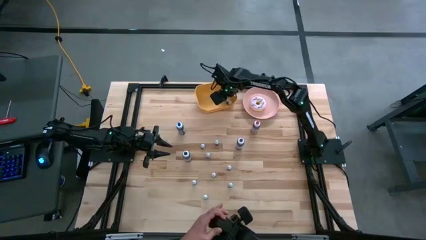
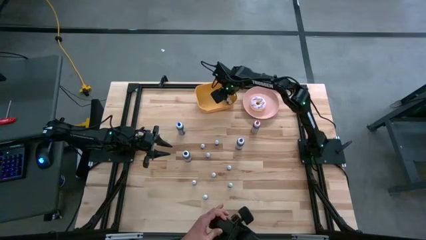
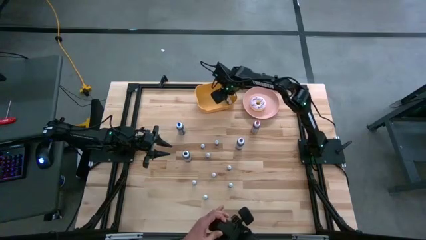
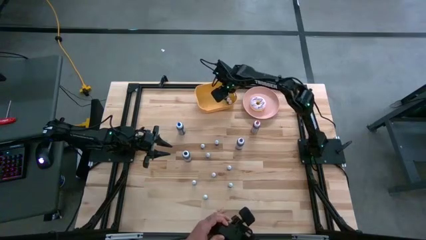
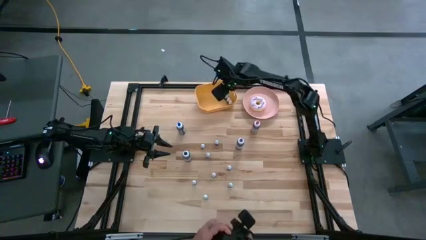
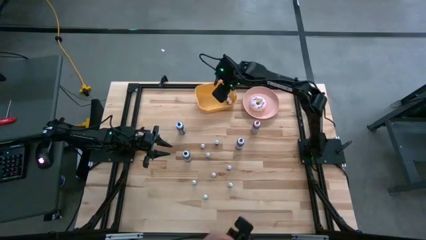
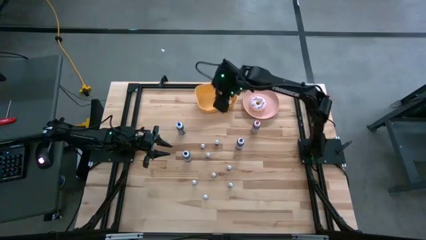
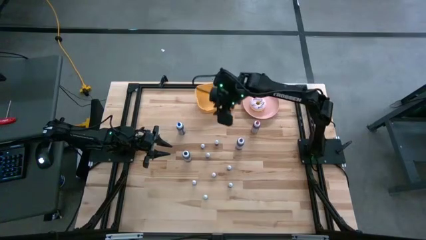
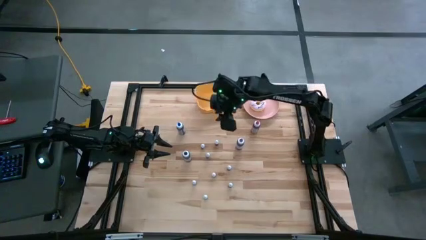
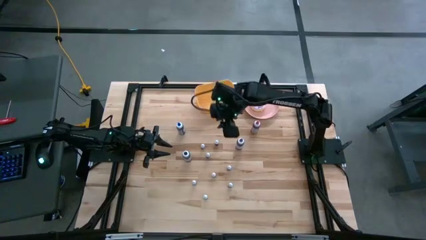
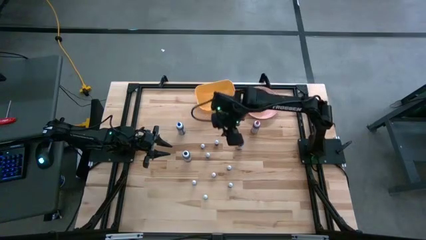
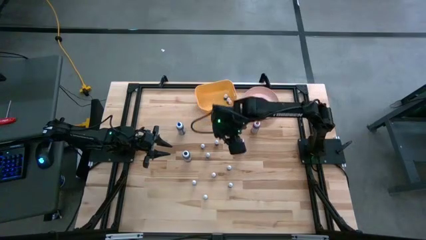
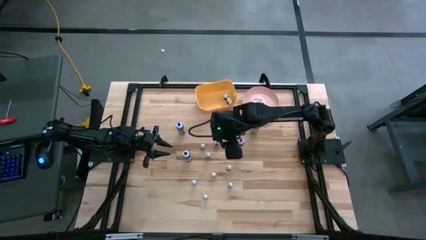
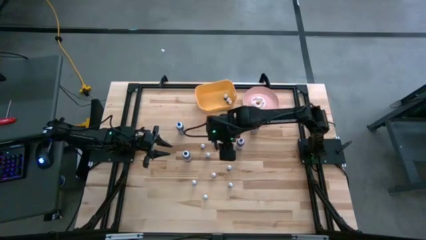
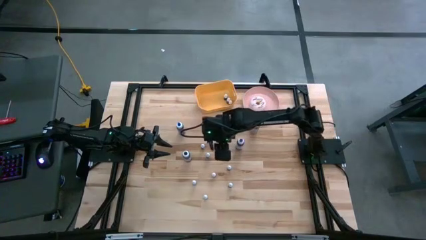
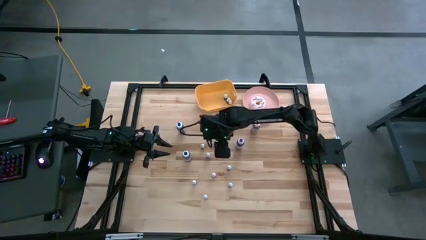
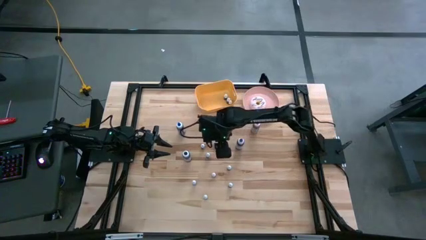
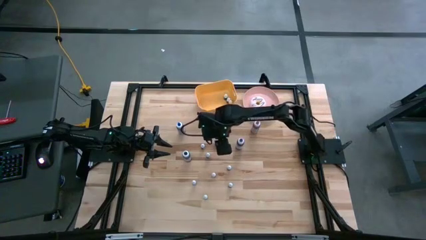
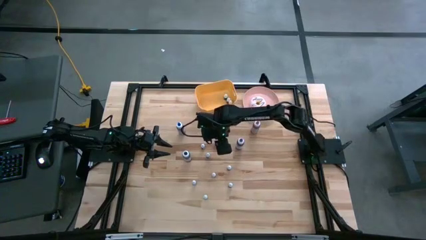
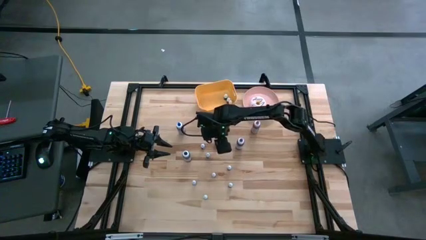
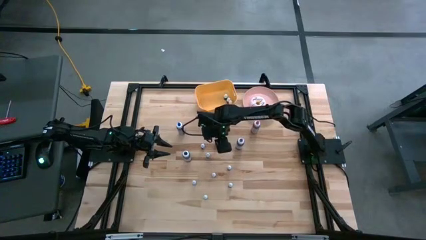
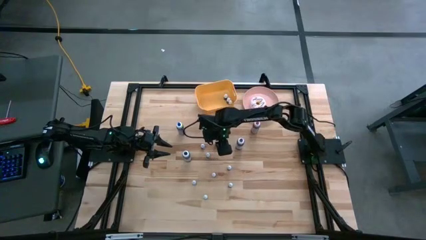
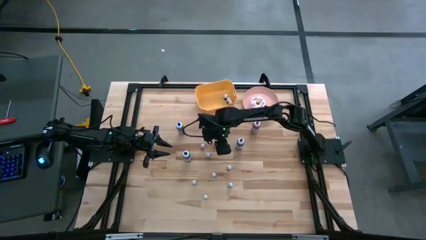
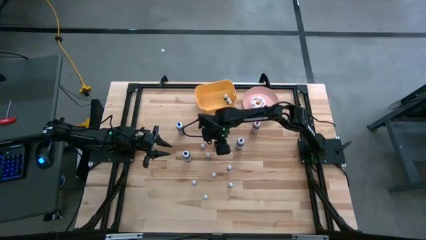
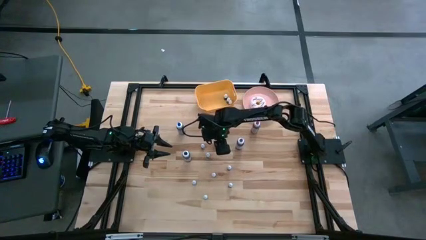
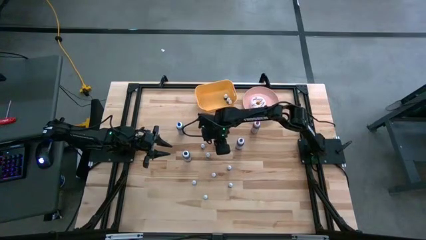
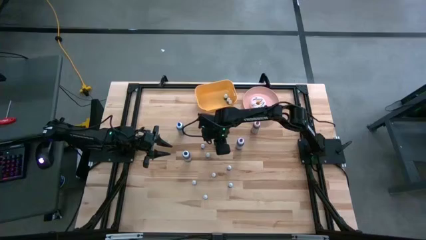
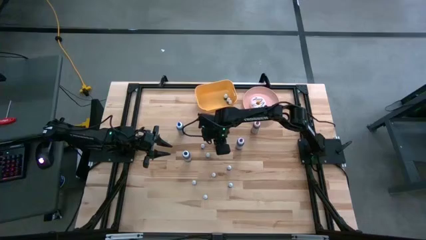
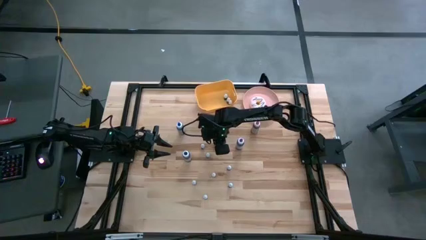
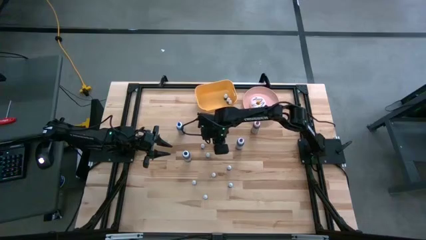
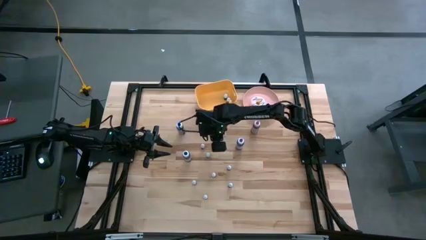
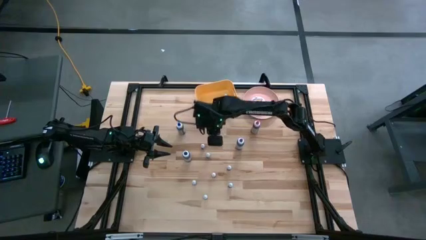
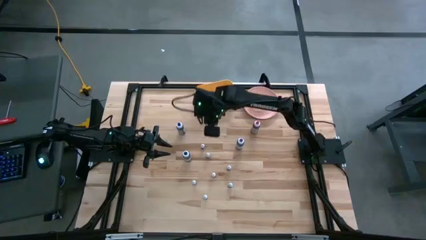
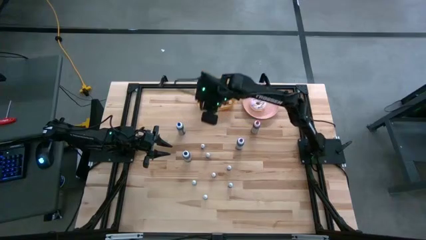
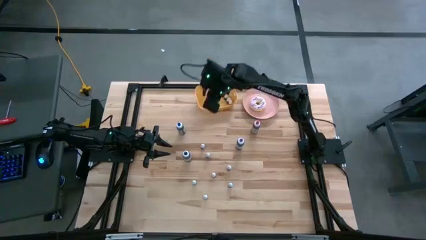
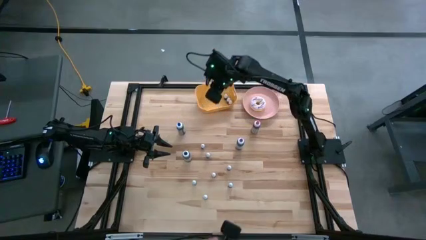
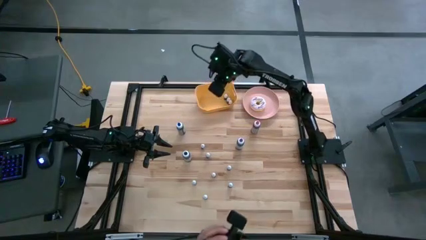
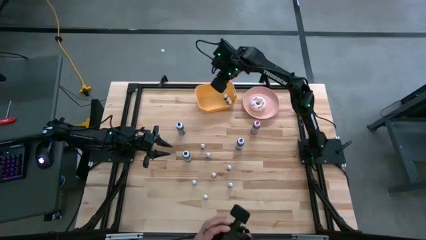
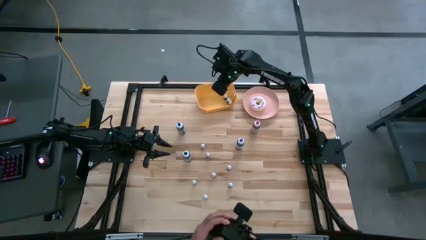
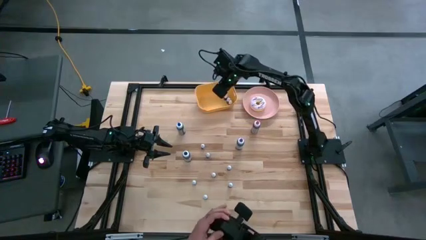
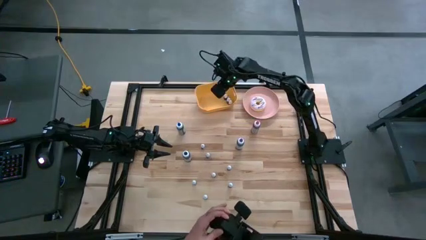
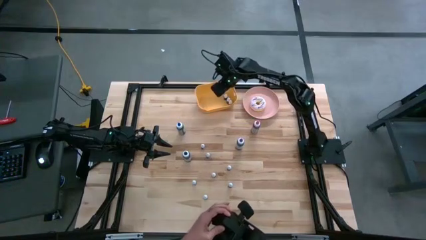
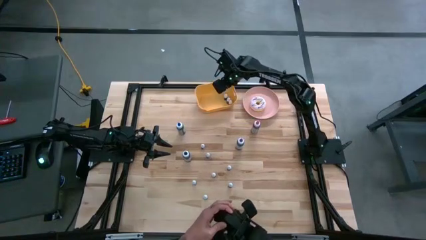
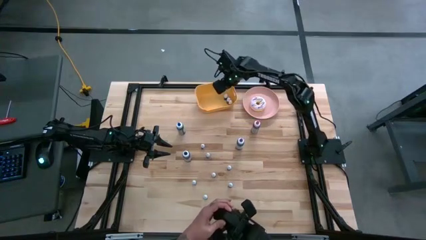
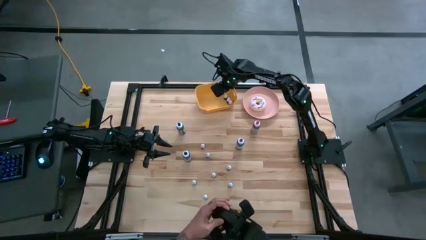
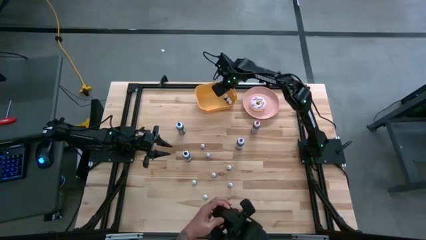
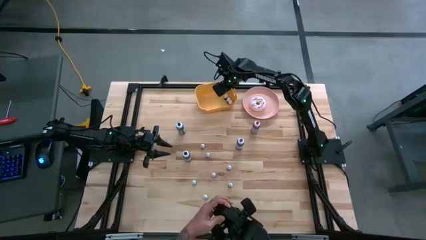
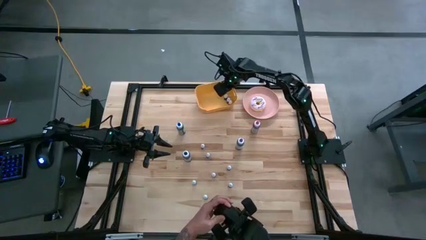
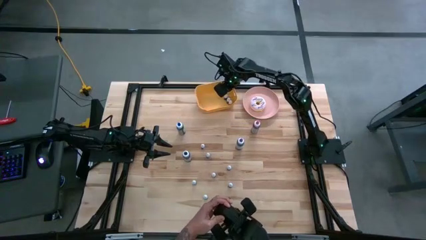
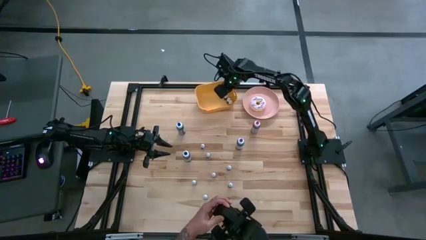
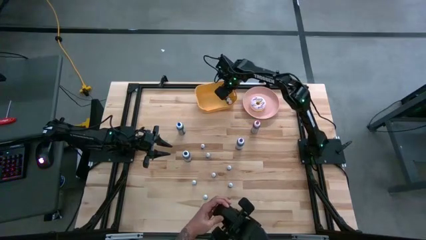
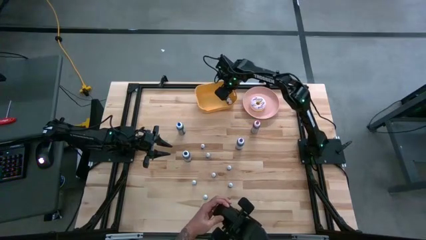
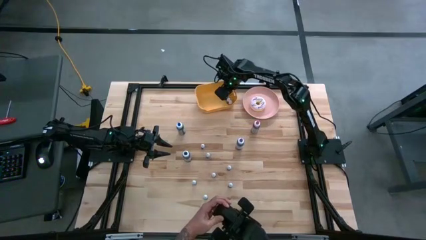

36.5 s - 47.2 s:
Task: Pick & Place food coloring
Put the small black food coloring bottle into the yellow bin
